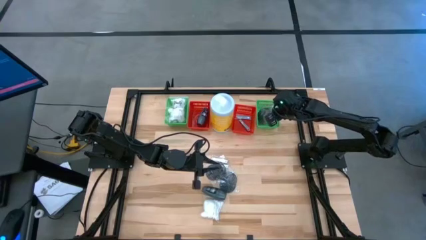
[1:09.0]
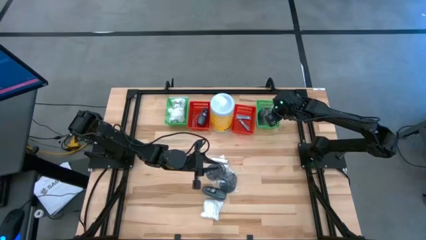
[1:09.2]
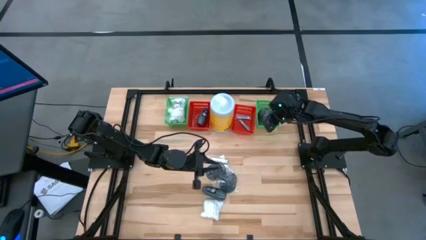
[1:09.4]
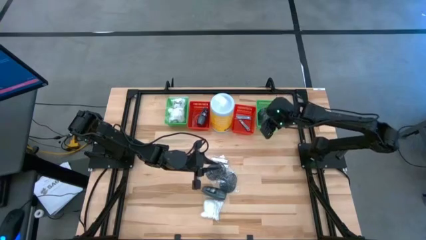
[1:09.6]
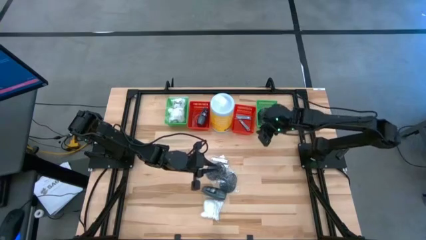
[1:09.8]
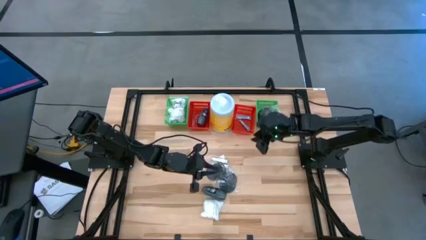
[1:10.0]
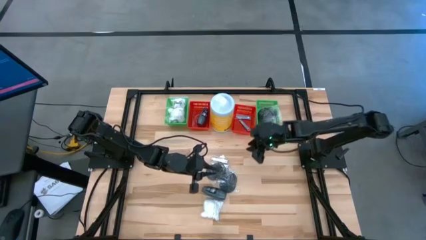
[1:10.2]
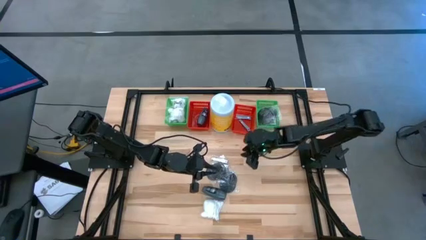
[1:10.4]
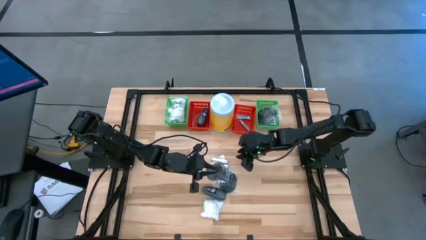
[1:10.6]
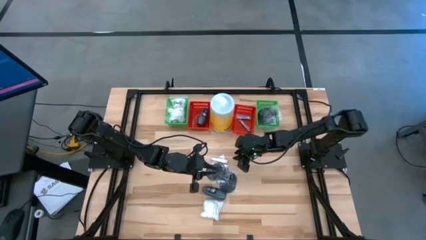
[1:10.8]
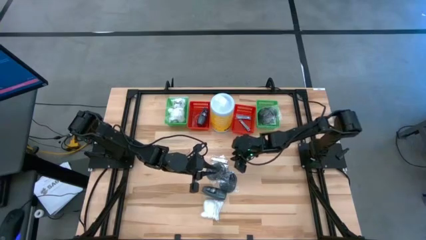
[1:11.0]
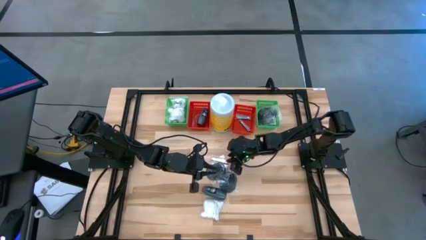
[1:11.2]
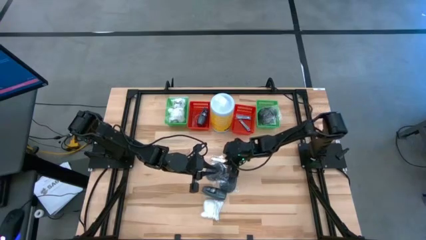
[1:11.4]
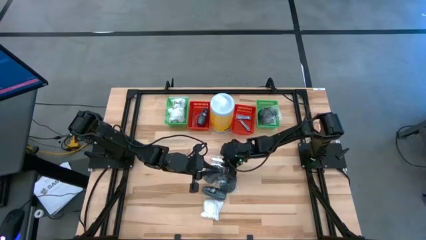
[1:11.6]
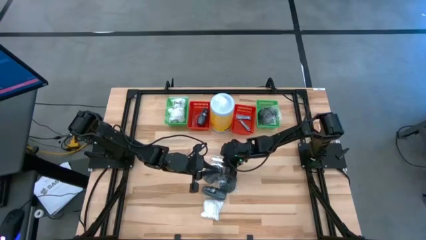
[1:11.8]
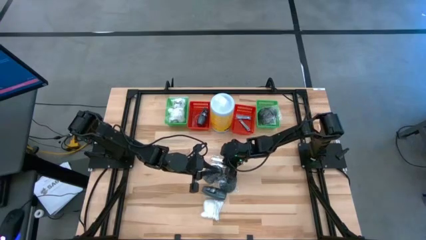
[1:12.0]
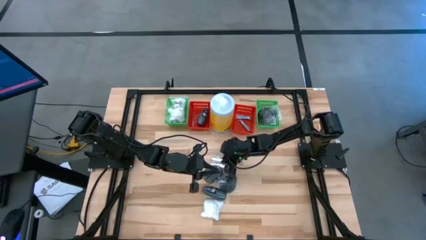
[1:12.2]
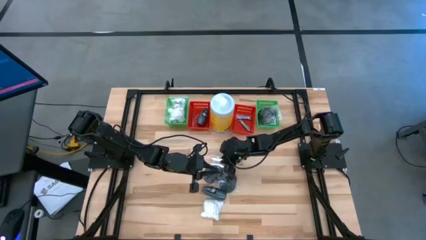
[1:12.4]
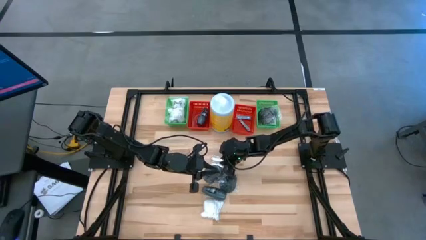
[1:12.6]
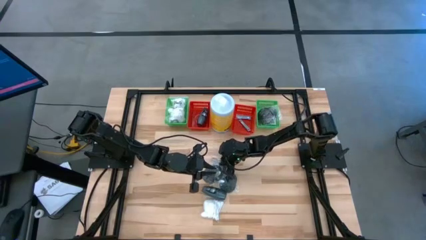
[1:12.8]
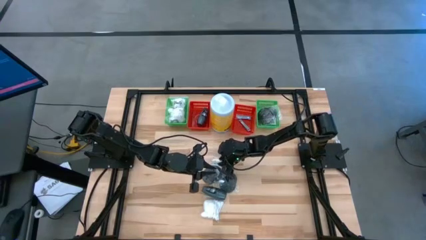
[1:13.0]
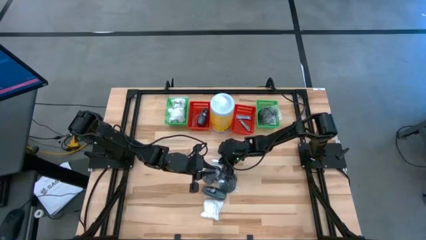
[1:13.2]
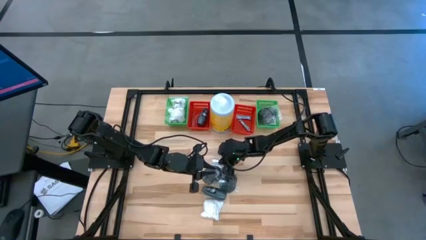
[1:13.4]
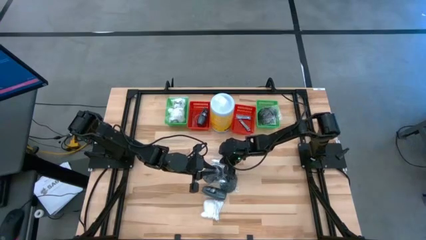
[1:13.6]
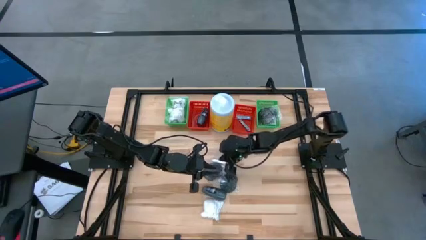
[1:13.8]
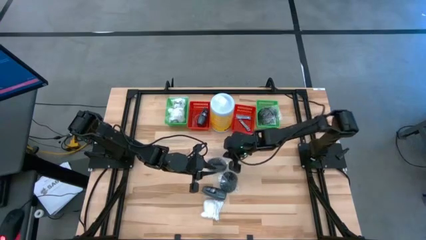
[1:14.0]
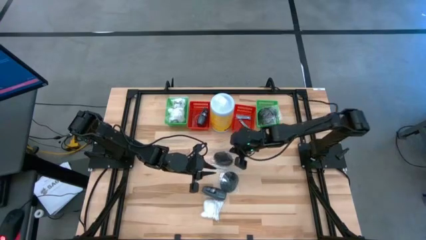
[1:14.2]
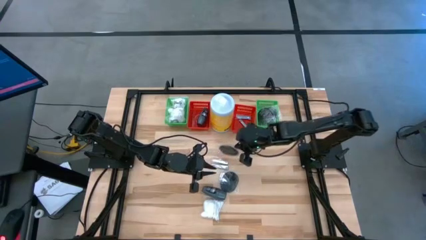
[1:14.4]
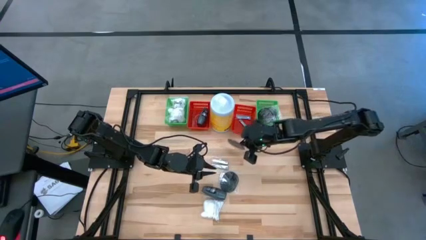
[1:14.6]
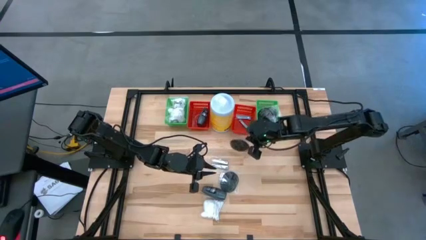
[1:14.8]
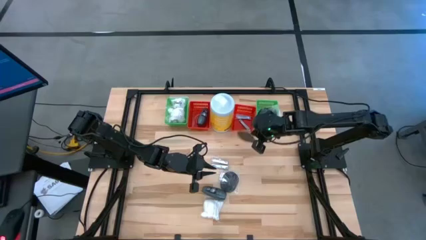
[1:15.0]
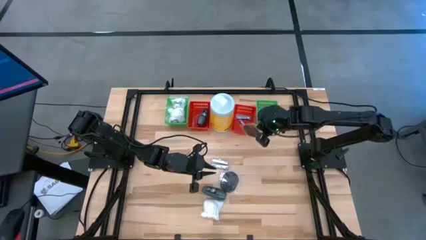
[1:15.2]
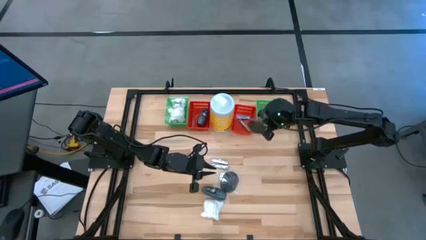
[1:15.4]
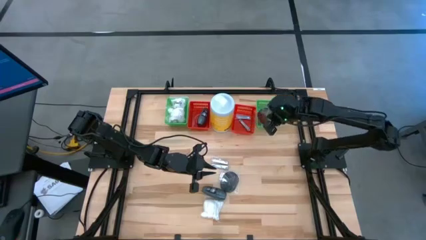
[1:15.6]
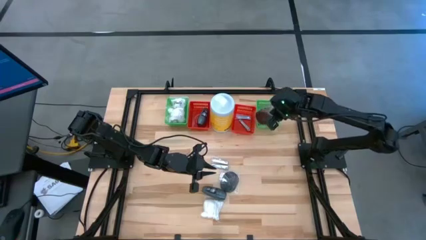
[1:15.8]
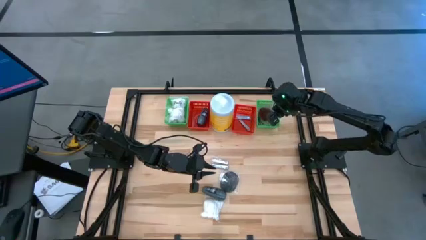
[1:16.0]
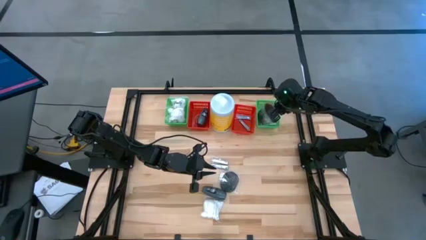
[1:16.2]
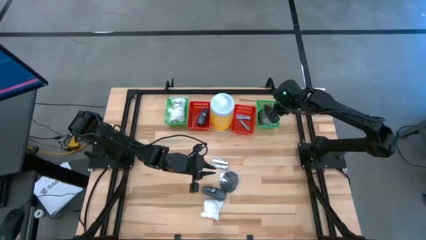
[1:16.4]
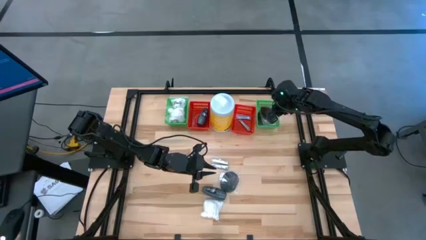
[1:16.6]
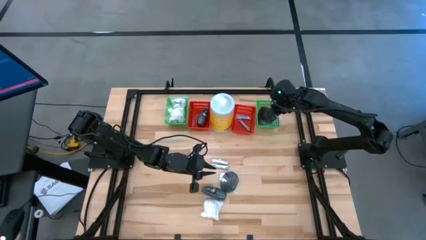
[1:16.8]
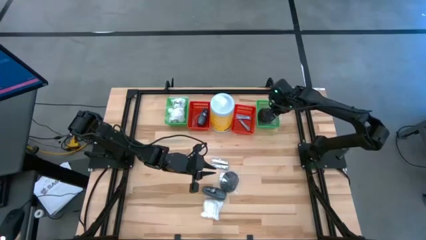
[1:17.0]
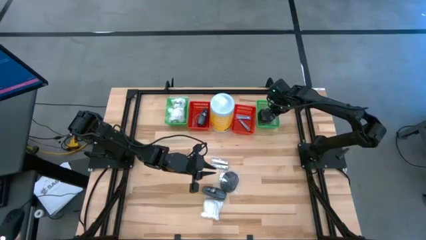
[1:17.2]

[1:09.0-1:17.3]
Task: Pick & Place Travel size toiletries
Put the black hairbrush into the right green bin

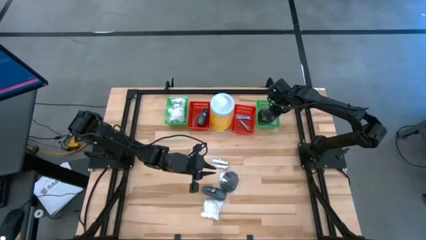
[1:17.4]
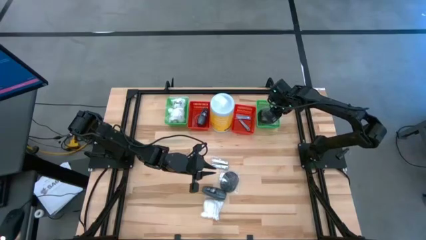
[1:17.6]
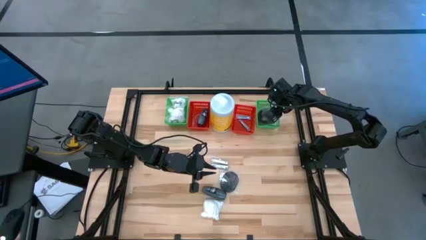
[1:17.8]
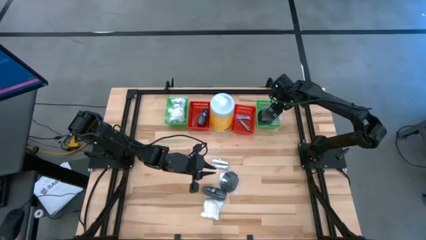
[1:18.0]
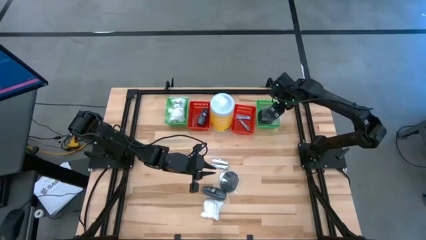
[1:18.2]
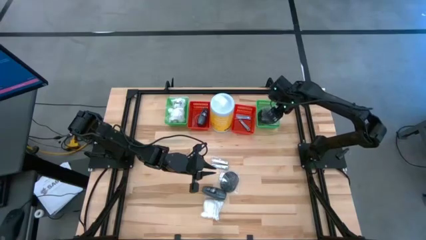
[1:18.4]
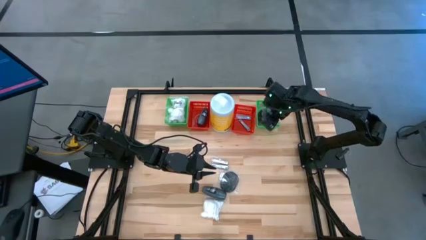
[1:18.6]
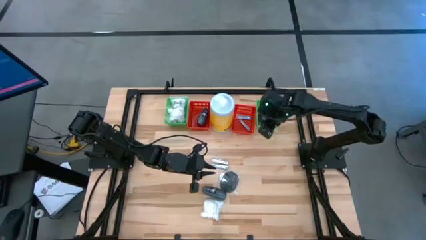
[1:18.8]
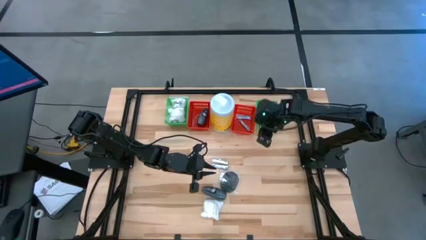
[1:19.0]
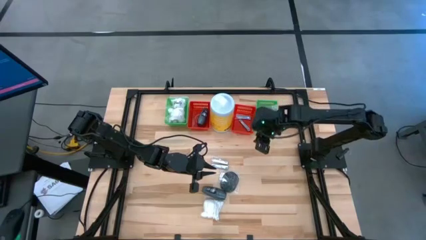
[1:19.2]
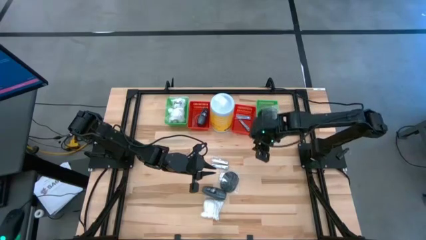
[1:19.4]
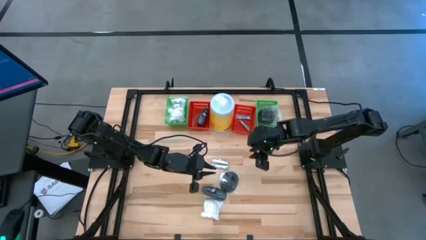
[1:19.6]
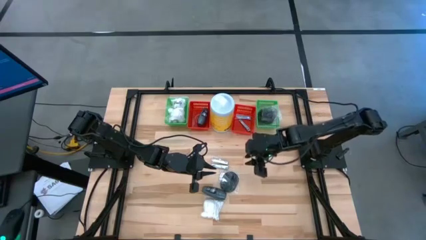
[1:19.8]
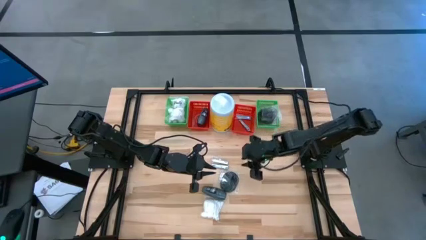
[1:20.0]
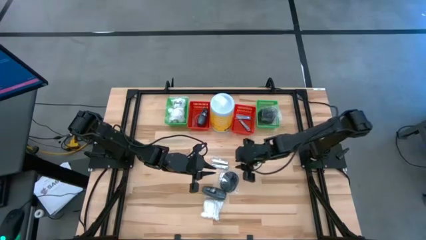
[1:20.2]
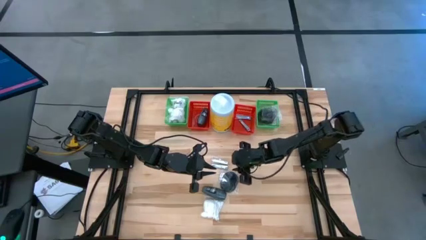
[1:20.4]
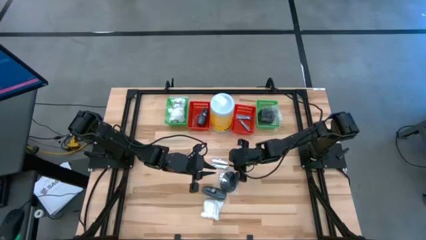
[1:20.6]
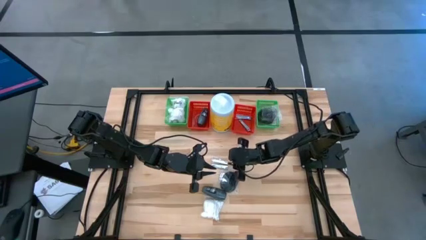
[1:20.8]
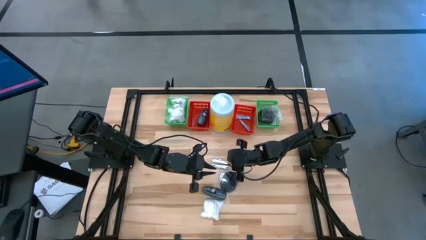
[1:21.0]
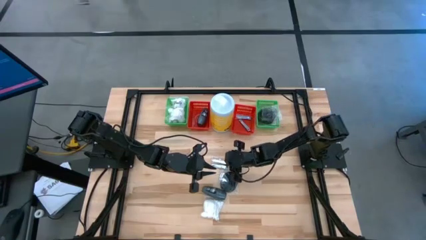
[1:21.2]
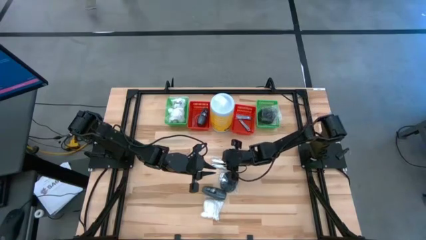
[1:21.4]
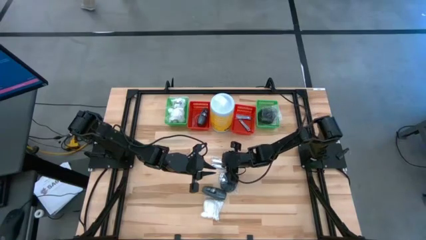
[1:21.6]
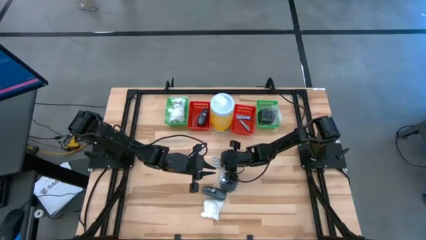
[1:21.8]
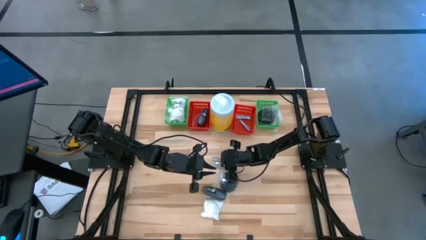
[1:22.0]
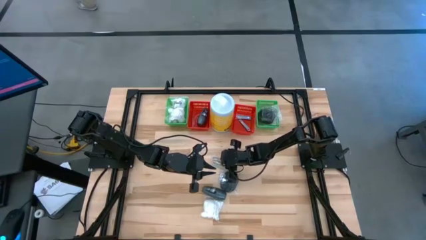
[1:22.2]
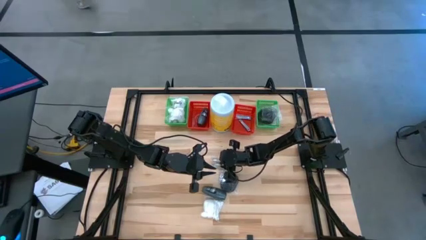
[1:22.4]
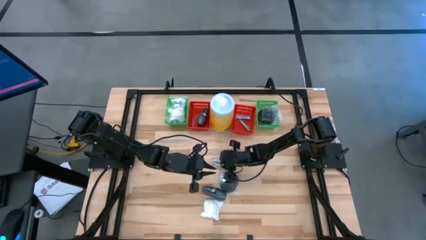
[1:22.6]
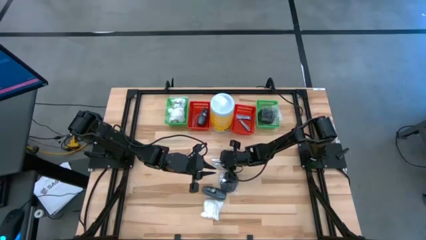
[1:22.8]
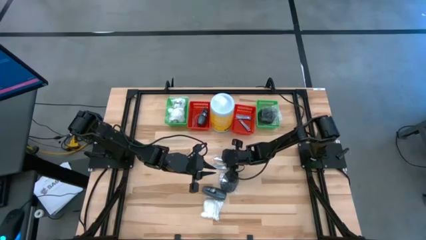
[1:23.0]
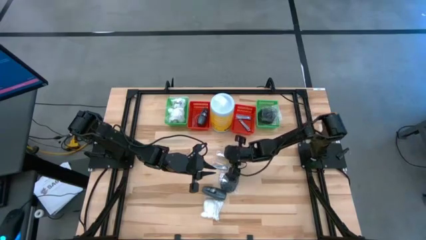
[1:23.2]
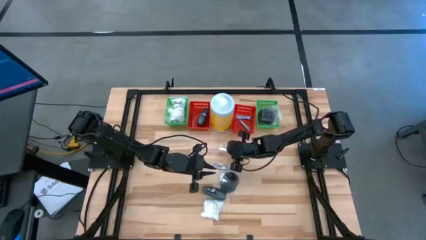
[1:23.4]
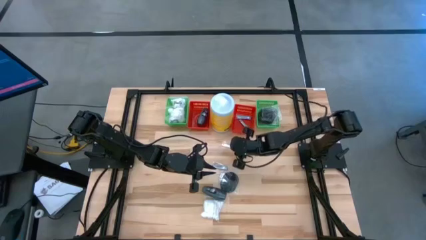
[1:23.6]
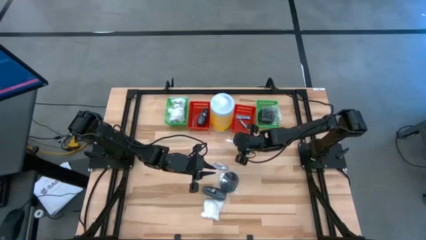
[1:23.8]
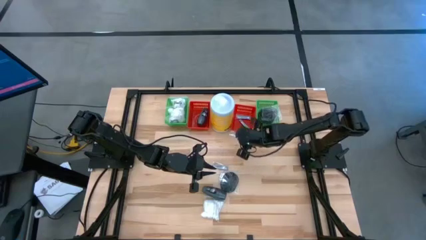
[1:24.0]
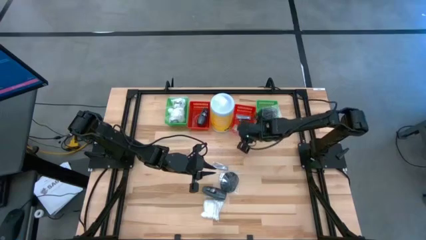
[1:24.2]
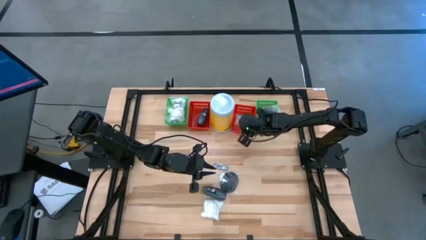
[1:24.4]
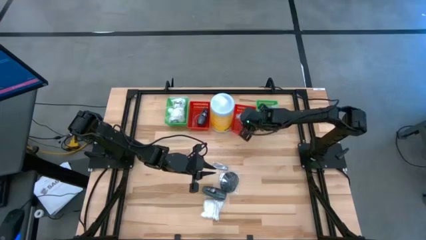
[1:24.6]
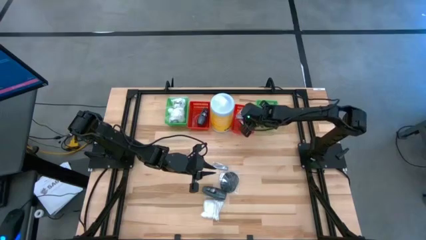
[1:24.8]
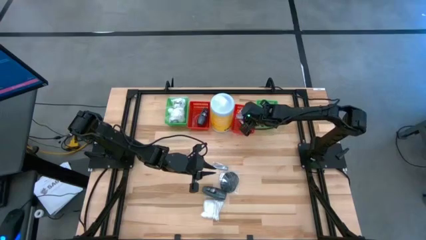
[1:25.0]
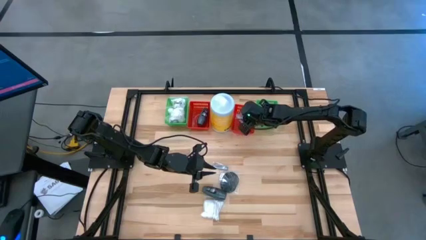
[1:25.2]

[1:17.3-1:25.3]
Put the silver nail cutter into the right red bin
